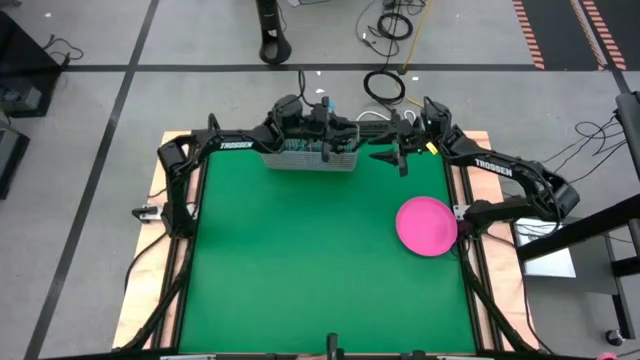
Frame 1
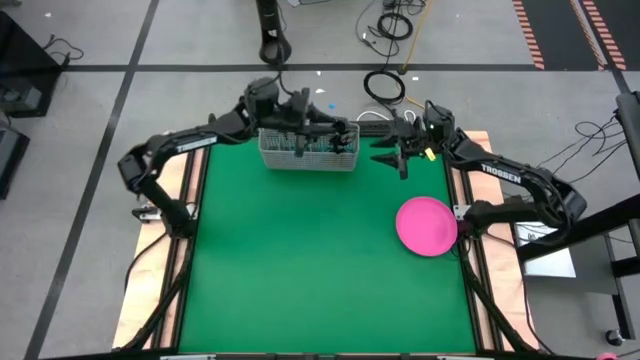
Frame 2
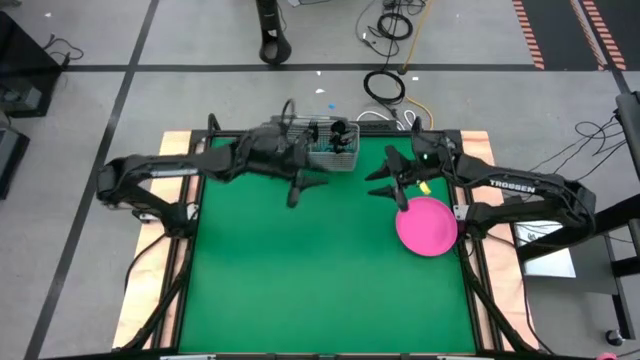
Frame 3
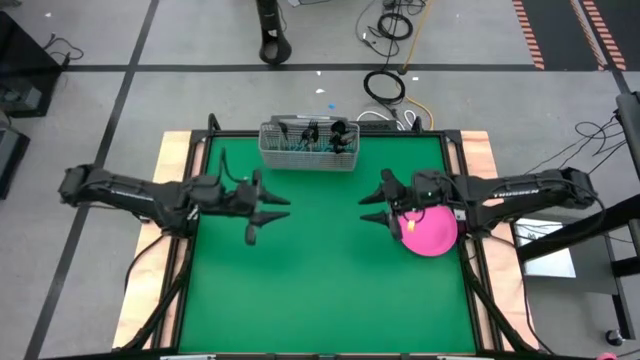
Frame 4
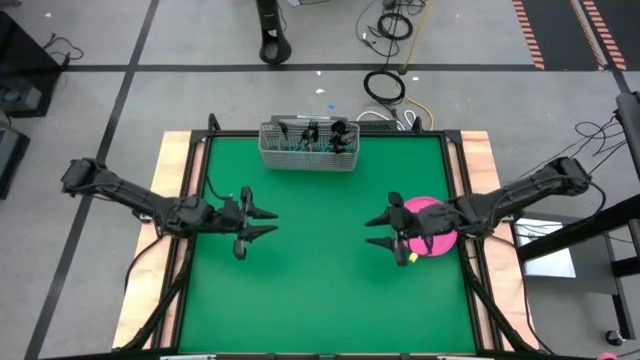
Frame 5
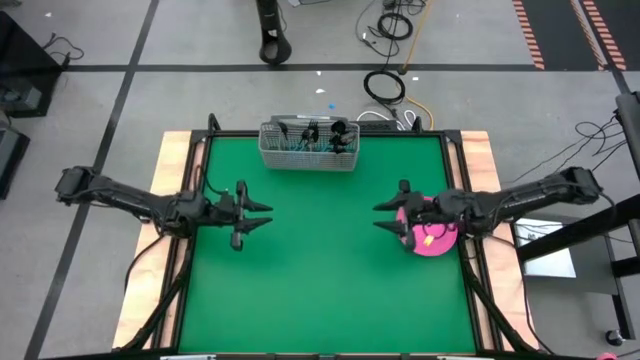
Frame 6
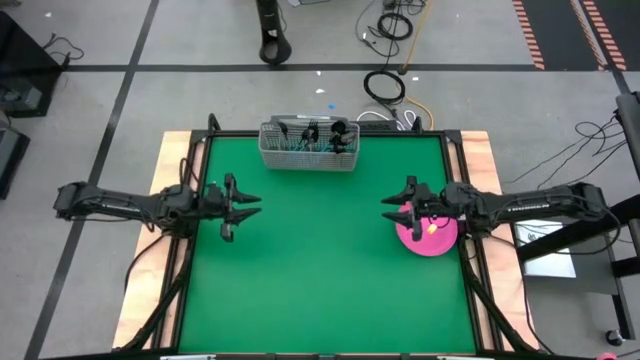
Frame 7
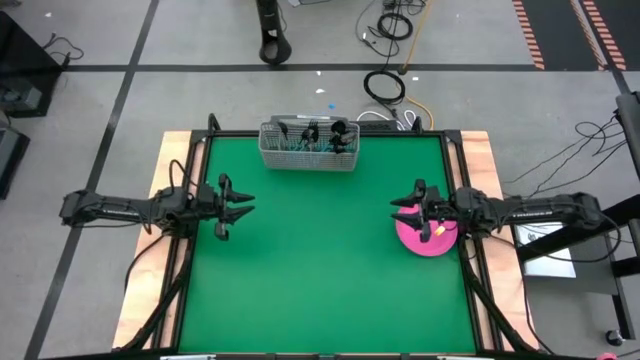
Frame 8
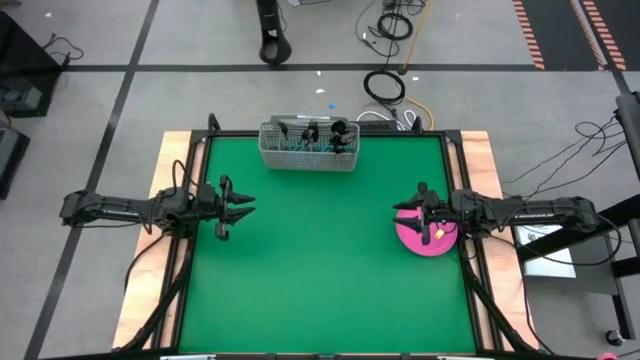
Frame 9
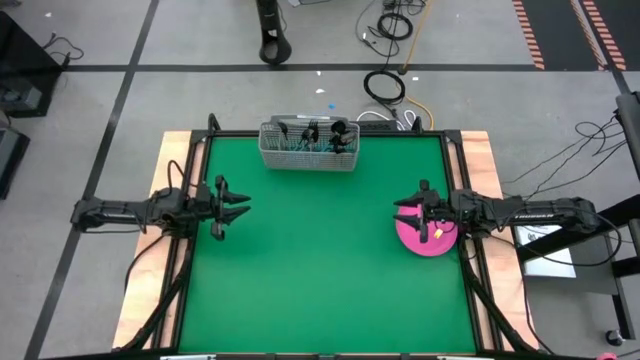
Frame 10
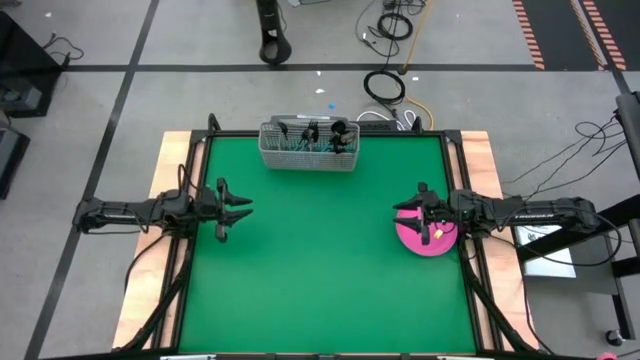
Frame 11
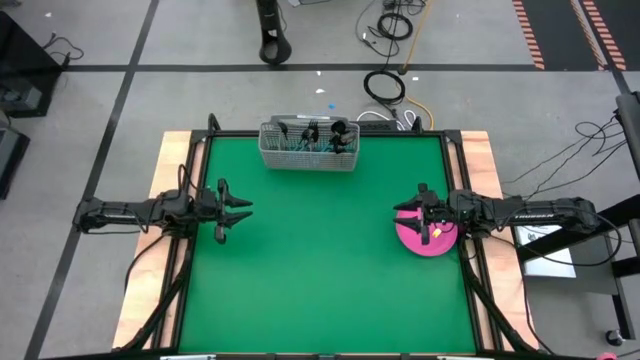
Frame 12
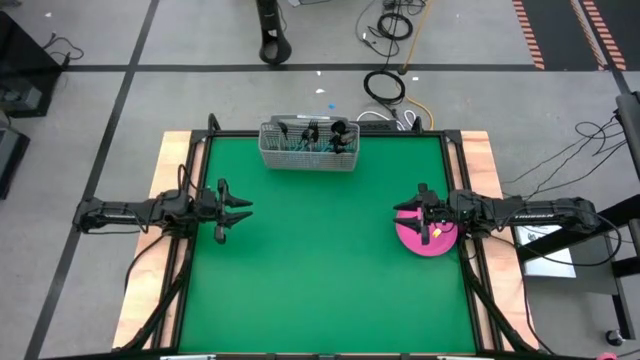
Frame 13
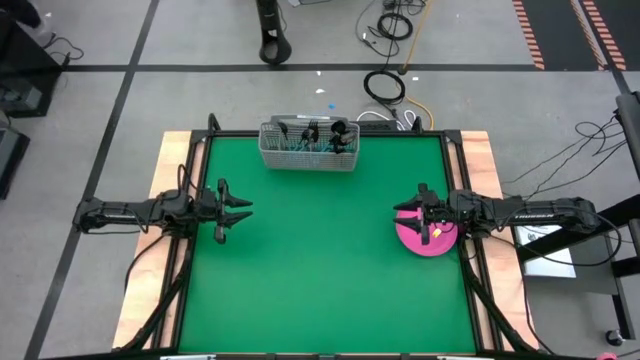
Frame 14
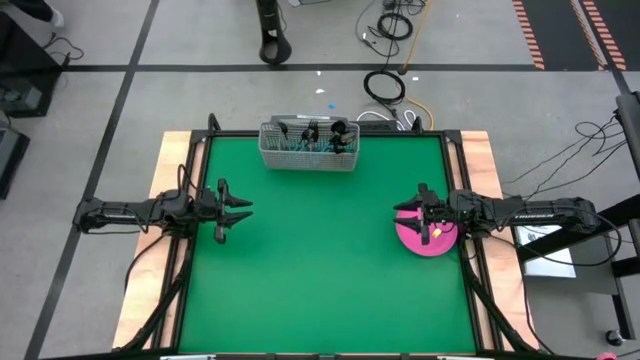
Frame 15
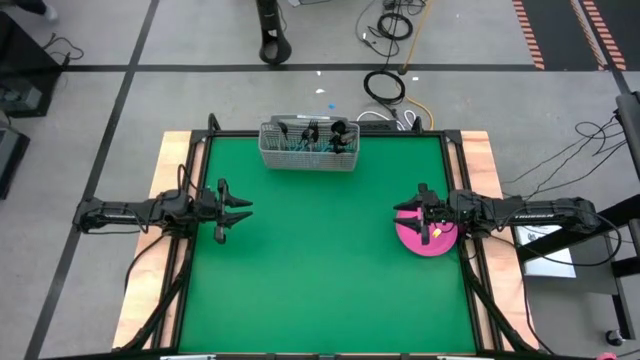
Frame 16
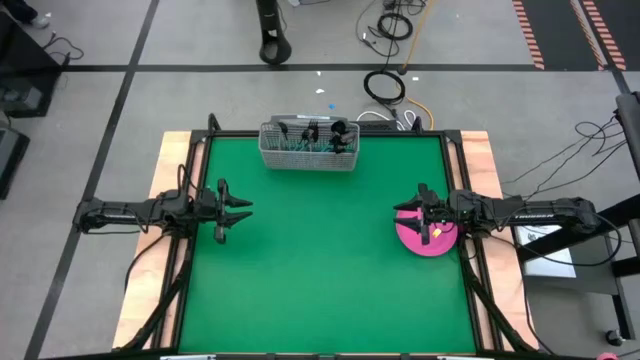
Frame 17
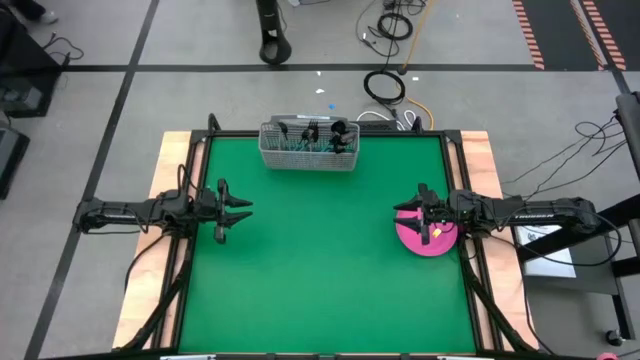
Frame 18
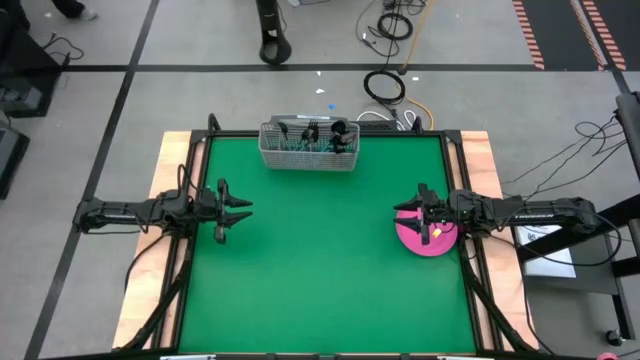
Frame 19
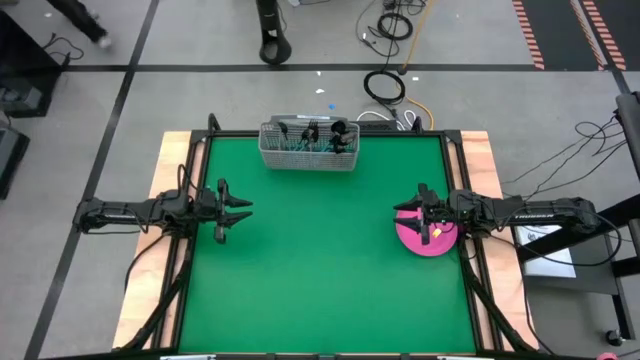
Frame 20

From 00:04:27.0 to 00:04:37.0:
Task: Sort silverware
Return to Home Position

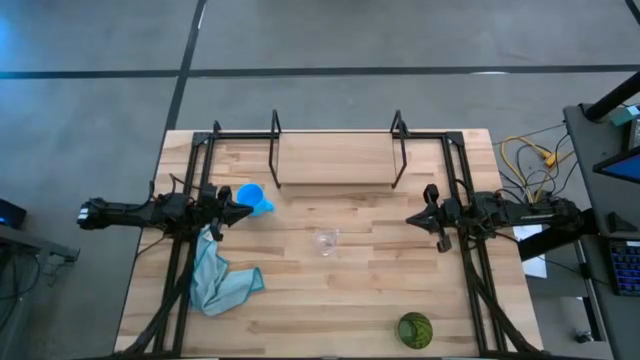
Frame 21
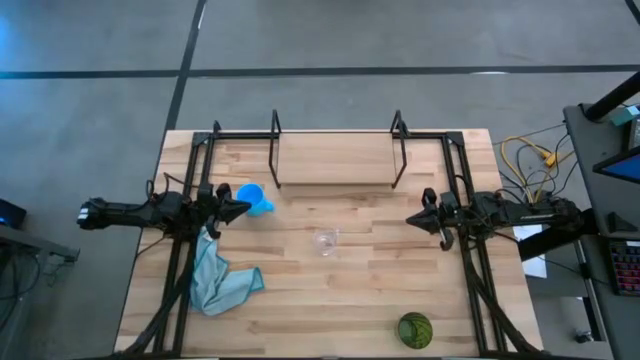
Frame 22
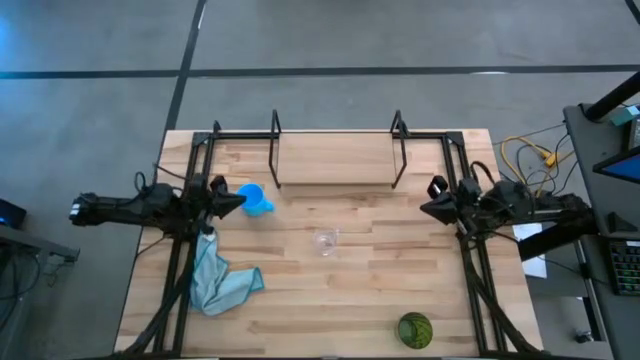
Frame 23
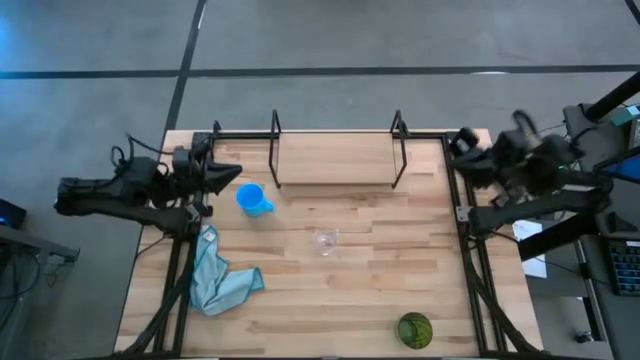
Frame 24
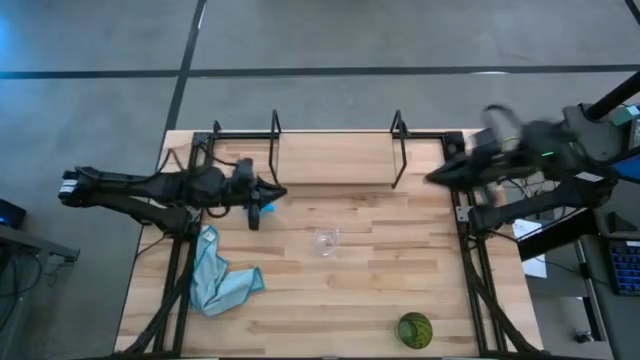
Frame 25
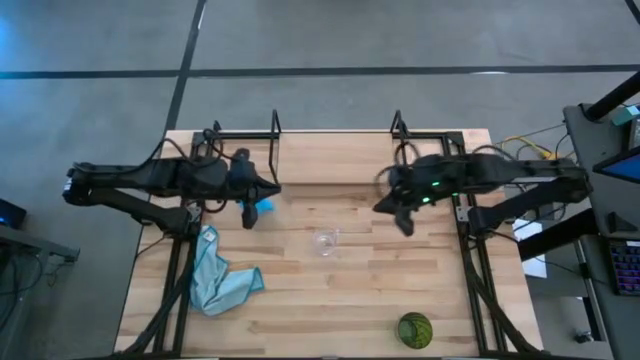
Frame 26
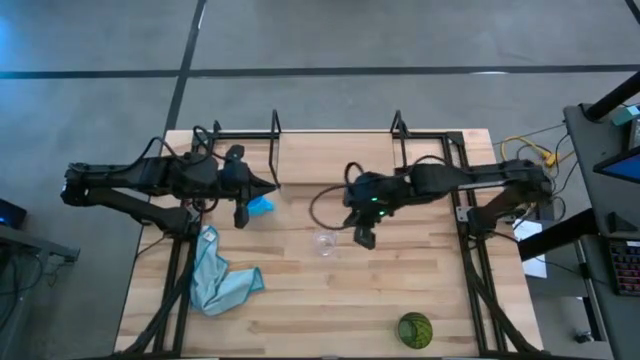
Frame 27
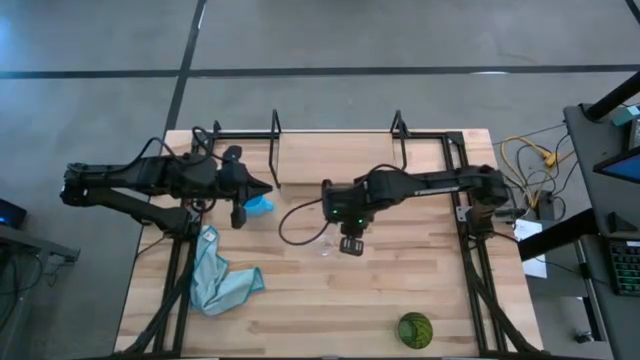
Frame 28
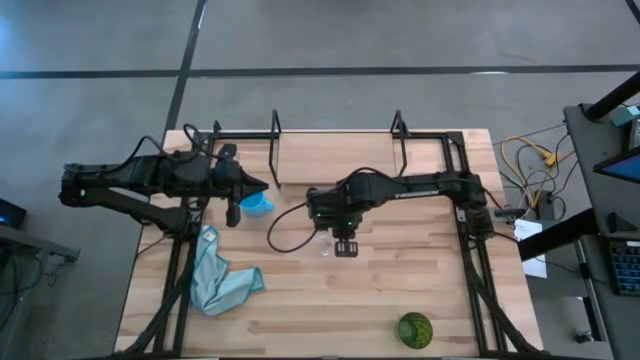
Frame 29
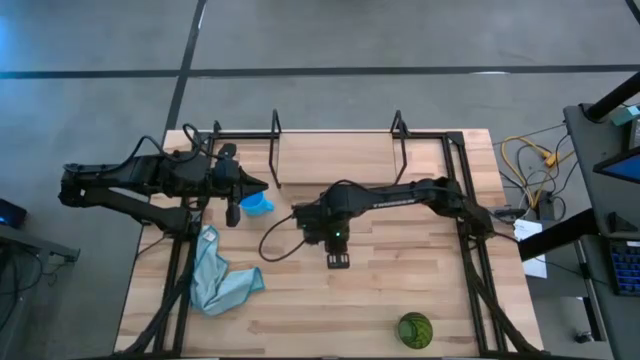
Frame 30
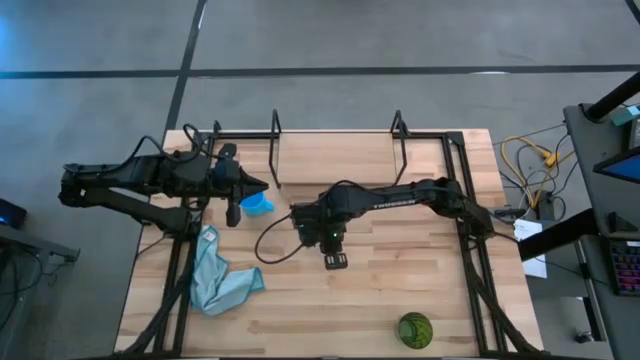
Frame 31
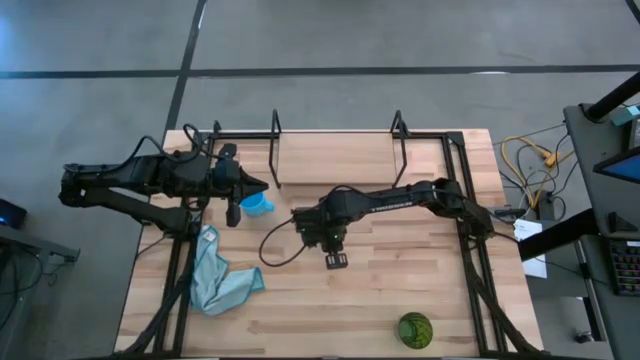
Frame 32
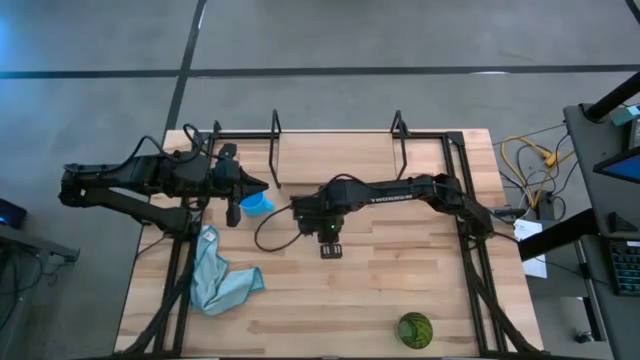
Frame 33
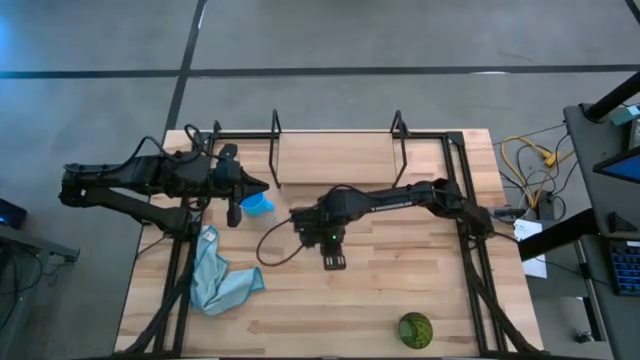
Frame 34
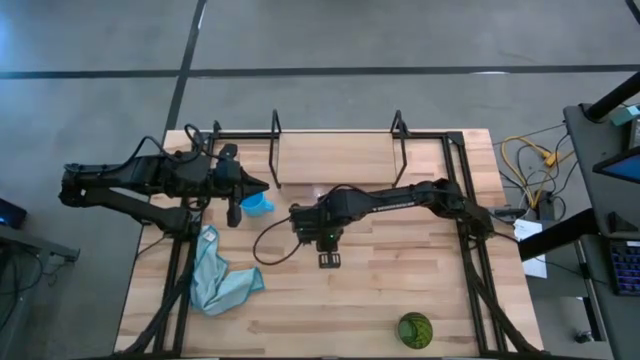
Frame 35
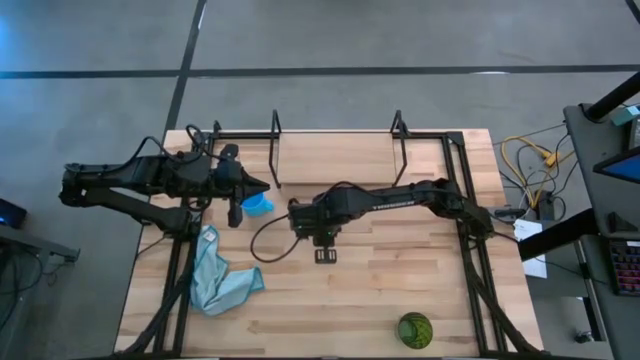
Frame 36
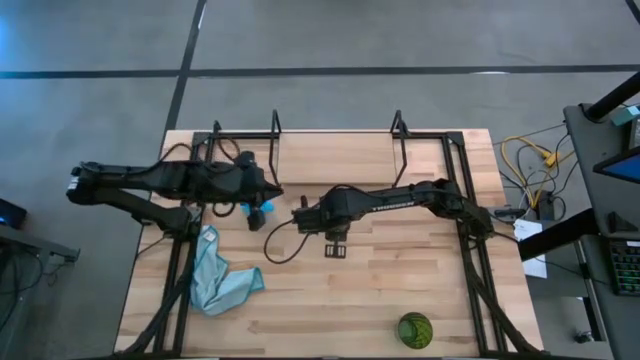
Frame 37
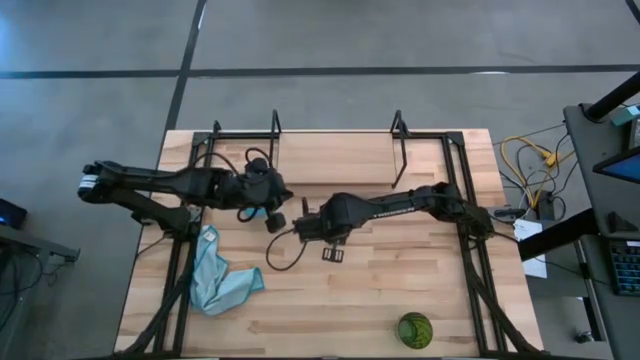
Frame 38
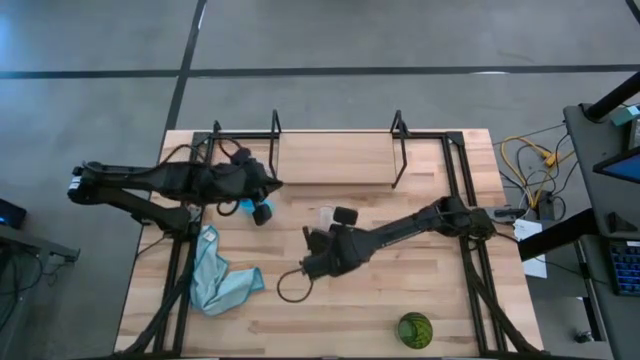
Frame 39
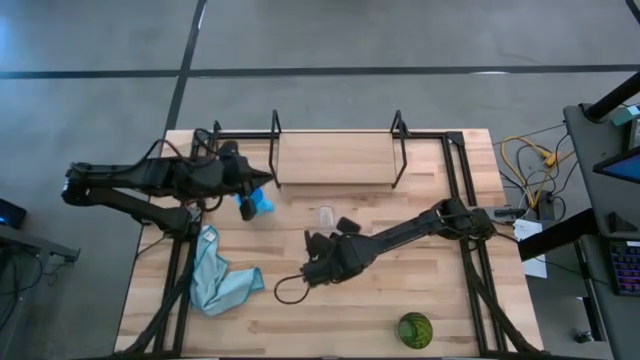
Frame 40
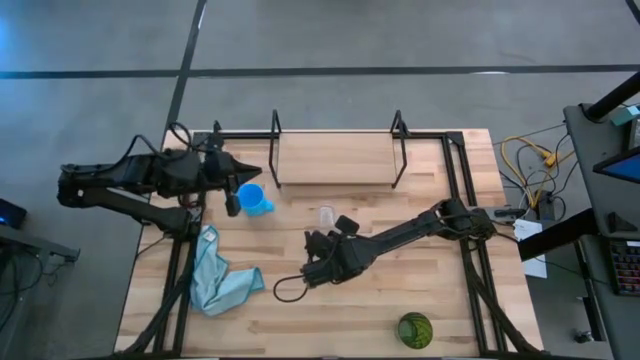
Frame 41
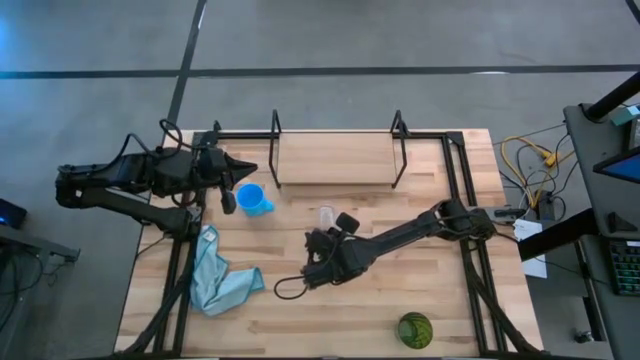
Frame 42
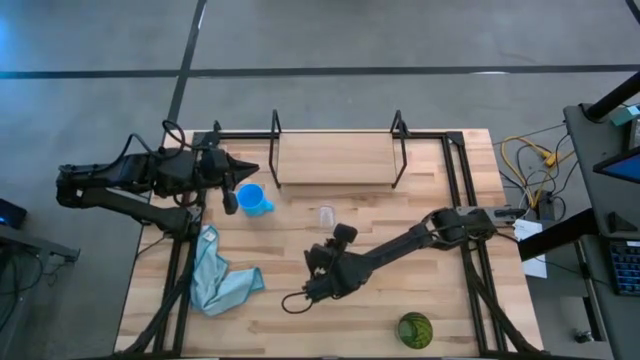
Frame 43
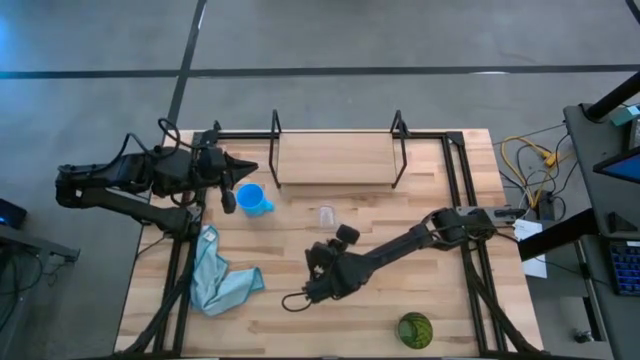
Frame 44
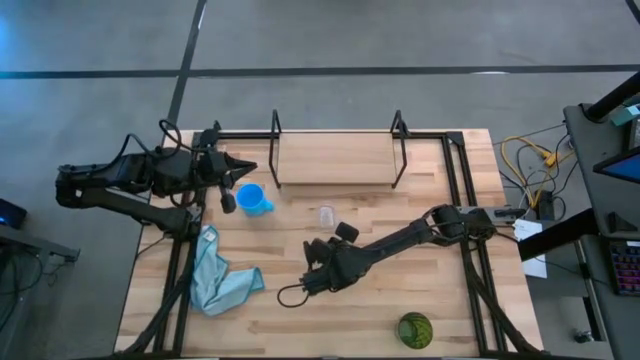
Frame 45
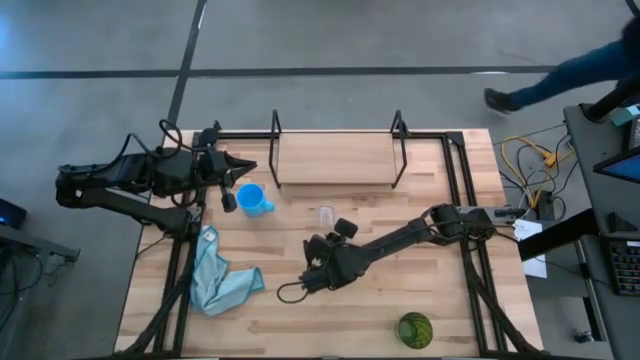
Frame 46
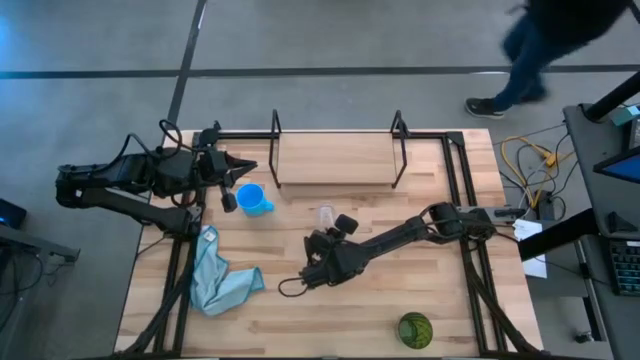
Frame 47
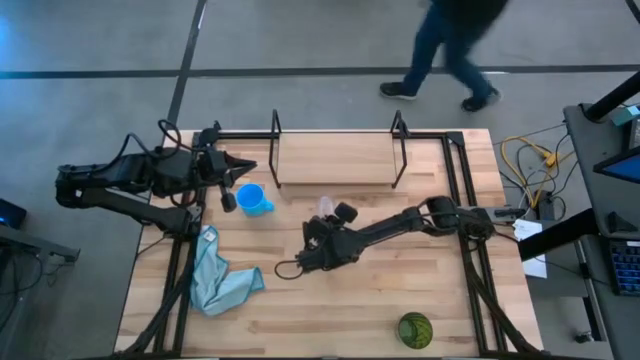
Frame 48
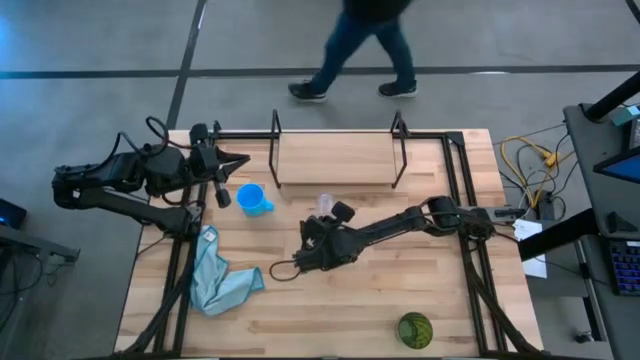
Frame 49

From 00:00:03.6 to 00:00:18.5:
Task: Stack small to large cups/mugs on shelf
Put the transparent mug on the shelf
